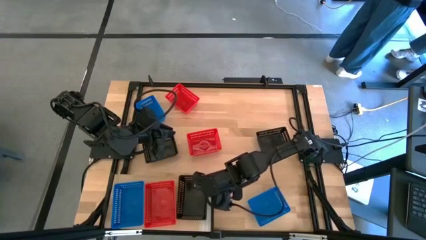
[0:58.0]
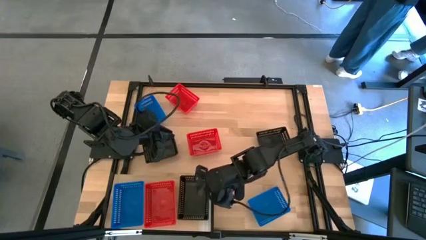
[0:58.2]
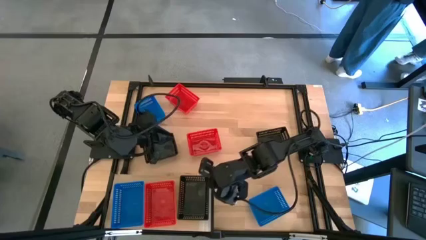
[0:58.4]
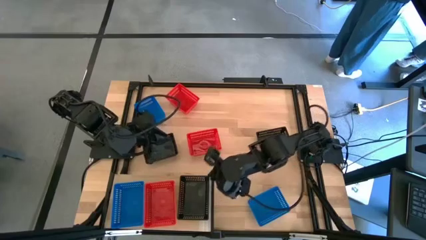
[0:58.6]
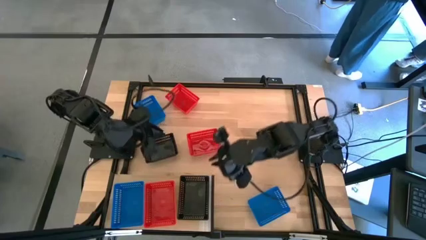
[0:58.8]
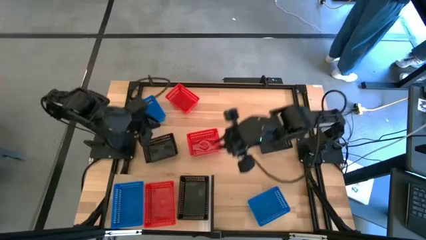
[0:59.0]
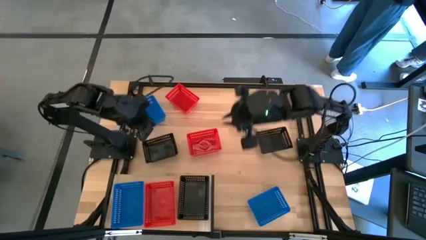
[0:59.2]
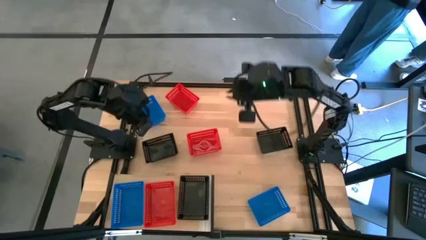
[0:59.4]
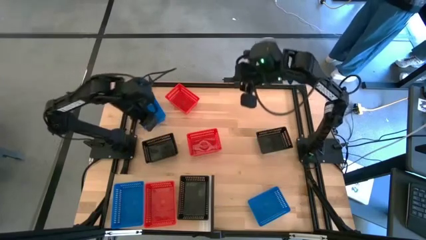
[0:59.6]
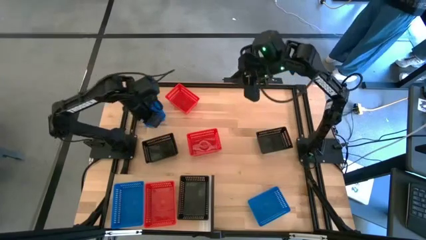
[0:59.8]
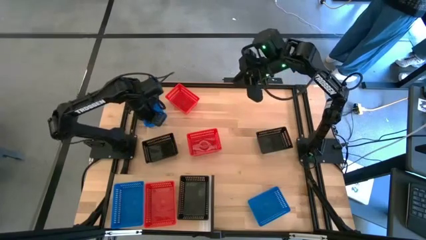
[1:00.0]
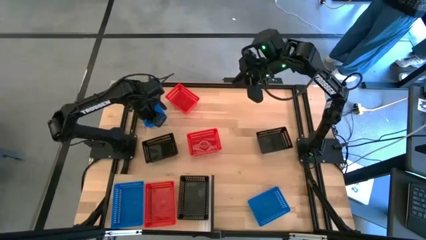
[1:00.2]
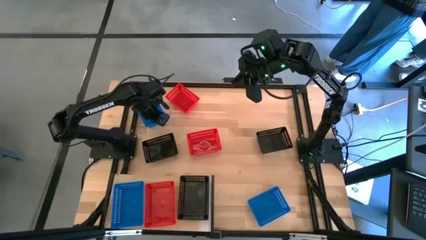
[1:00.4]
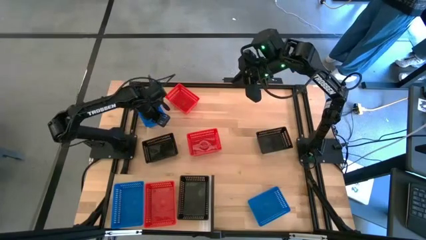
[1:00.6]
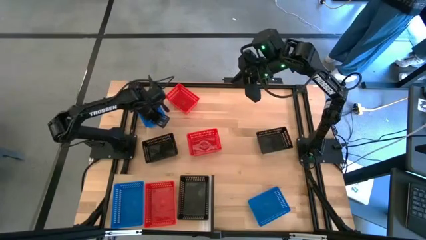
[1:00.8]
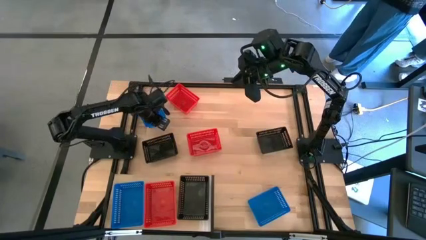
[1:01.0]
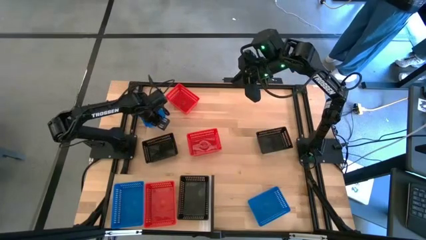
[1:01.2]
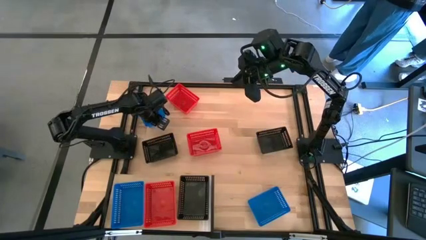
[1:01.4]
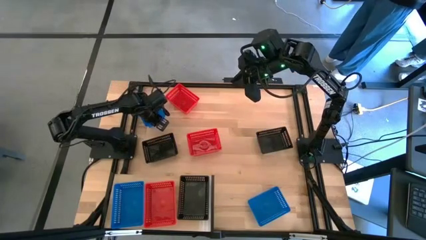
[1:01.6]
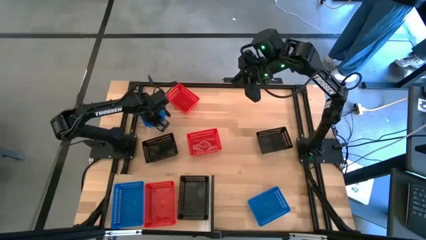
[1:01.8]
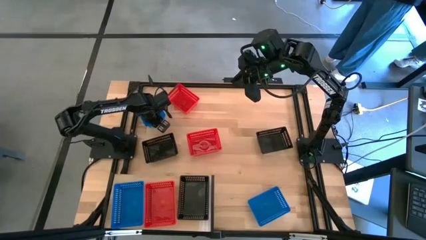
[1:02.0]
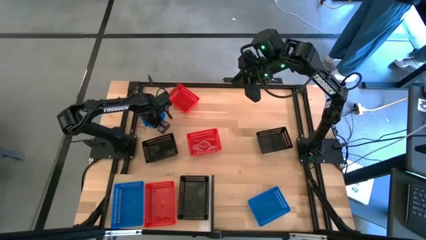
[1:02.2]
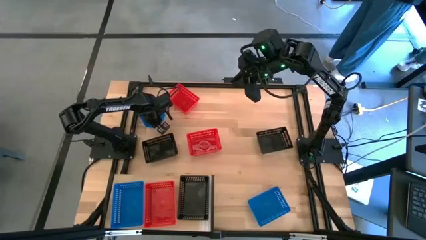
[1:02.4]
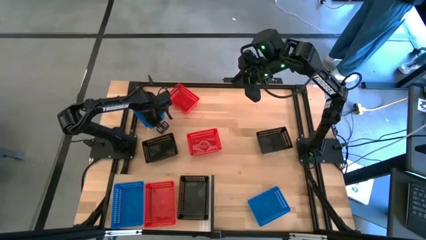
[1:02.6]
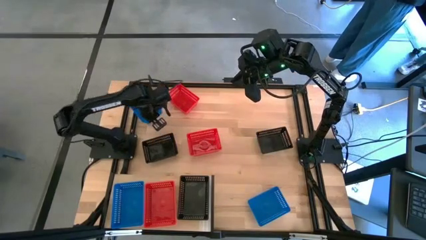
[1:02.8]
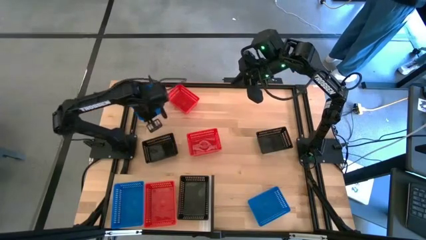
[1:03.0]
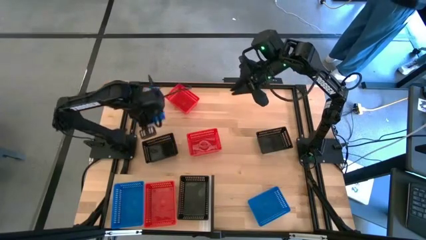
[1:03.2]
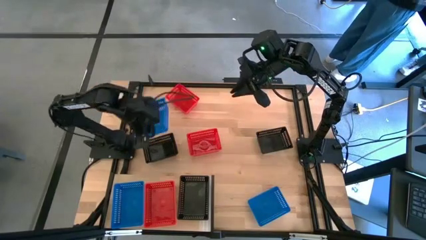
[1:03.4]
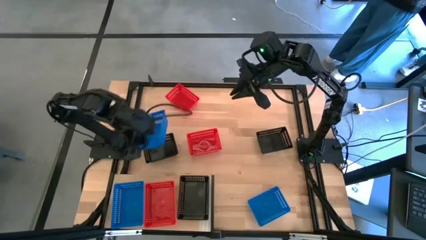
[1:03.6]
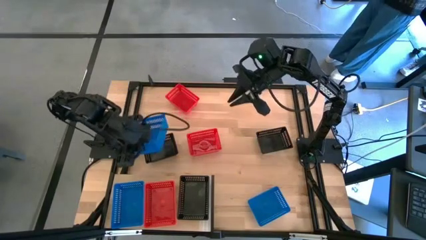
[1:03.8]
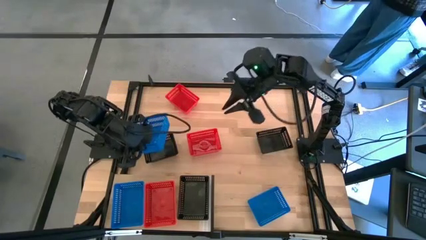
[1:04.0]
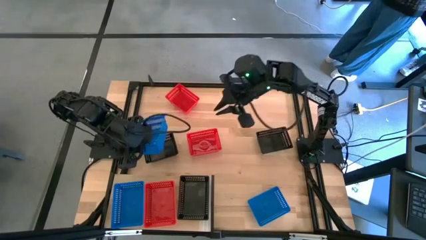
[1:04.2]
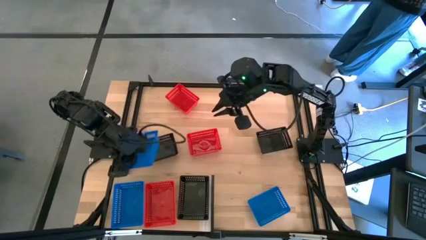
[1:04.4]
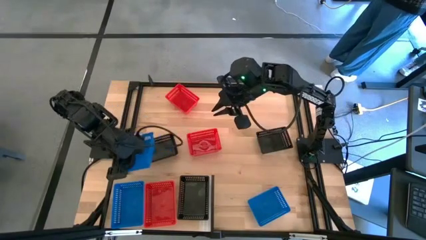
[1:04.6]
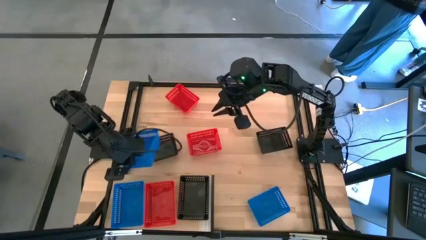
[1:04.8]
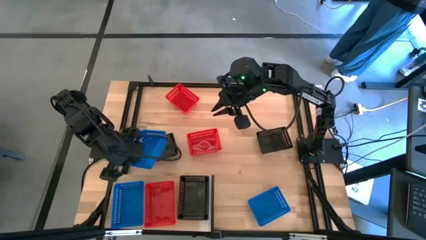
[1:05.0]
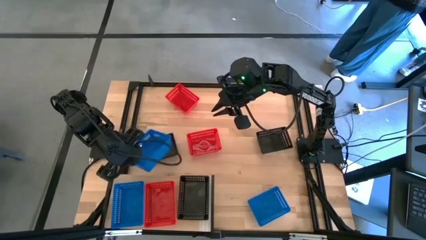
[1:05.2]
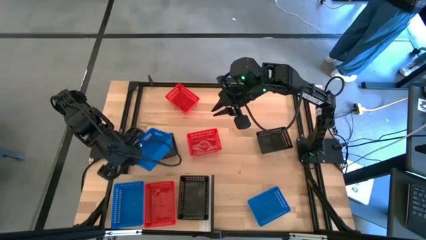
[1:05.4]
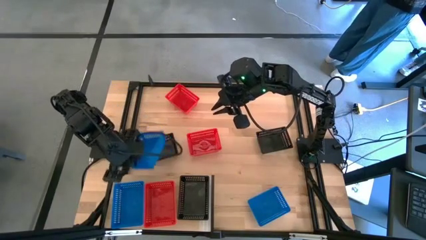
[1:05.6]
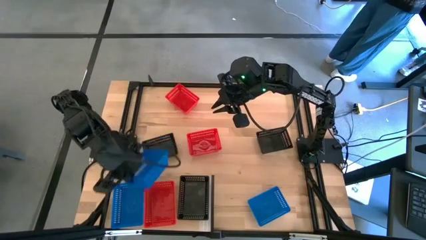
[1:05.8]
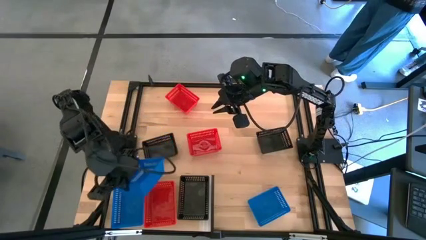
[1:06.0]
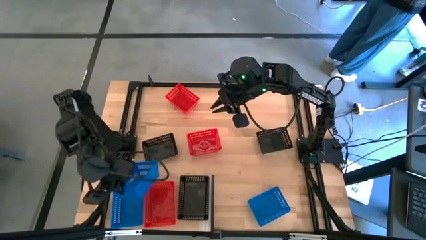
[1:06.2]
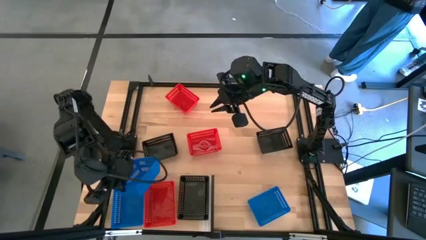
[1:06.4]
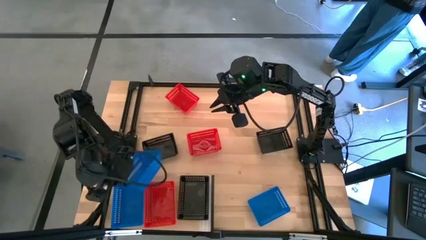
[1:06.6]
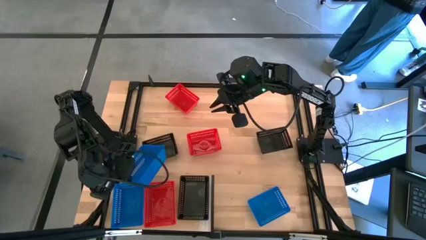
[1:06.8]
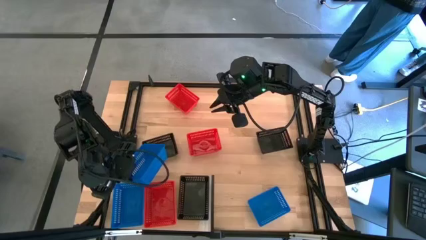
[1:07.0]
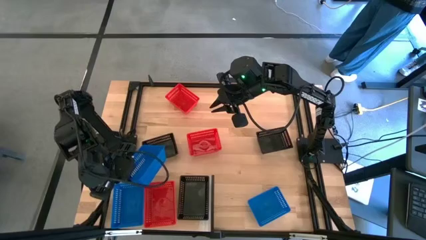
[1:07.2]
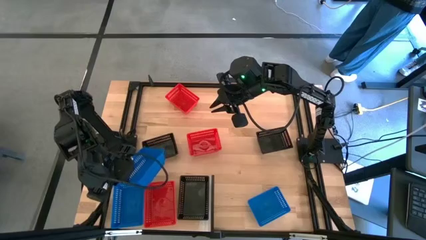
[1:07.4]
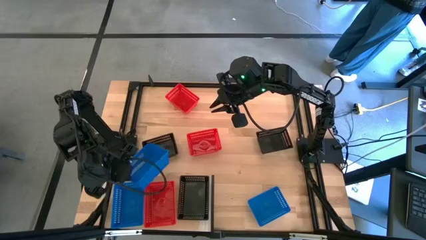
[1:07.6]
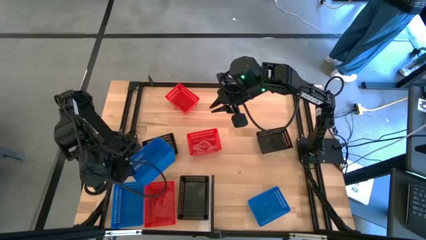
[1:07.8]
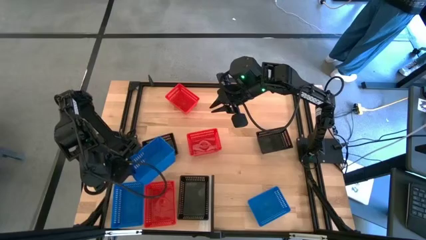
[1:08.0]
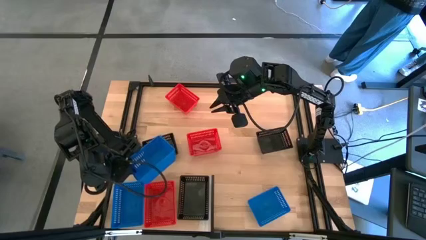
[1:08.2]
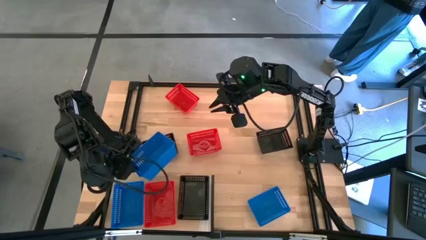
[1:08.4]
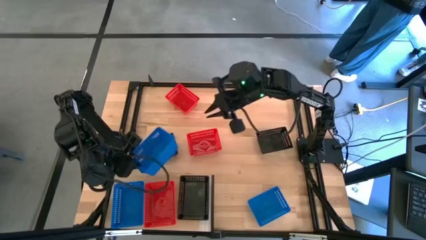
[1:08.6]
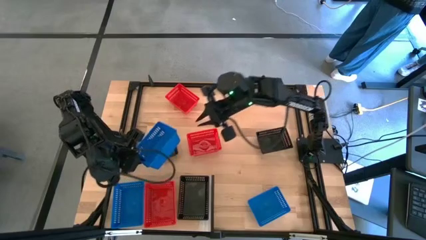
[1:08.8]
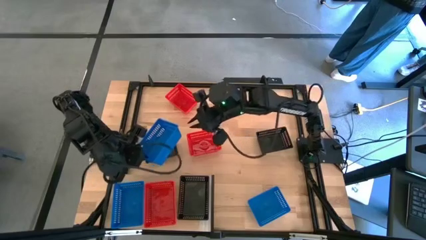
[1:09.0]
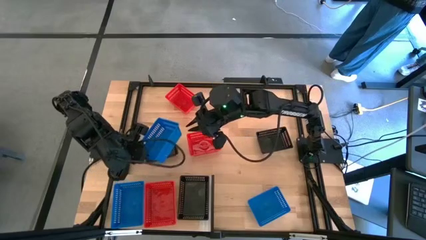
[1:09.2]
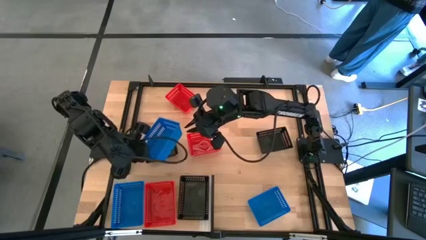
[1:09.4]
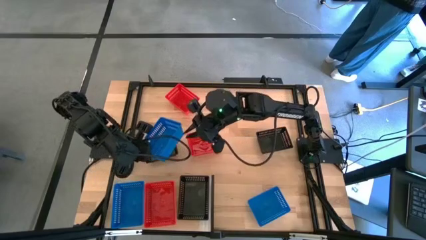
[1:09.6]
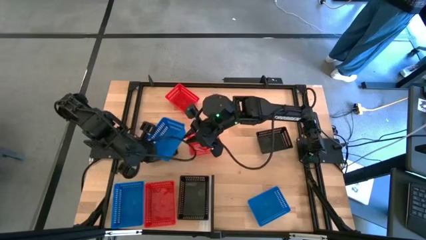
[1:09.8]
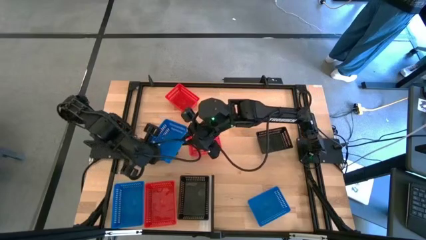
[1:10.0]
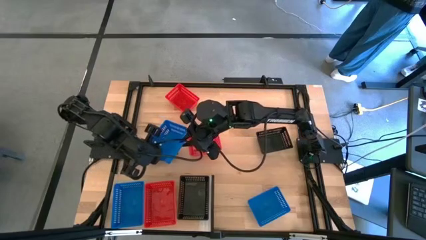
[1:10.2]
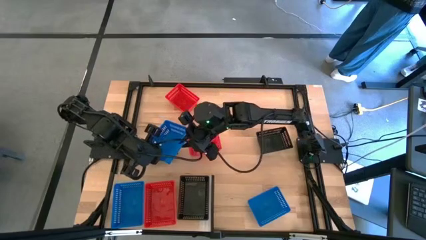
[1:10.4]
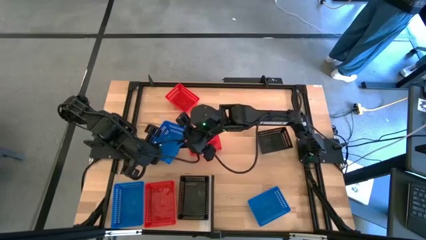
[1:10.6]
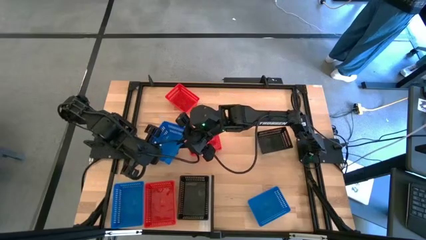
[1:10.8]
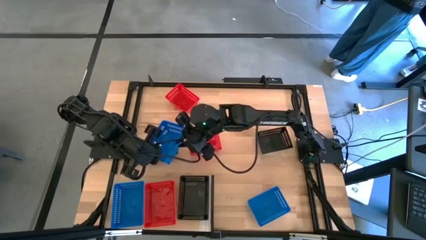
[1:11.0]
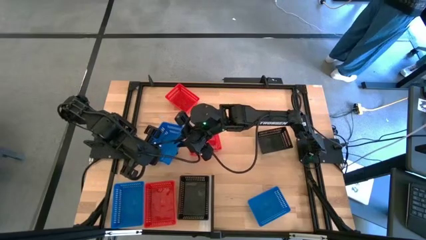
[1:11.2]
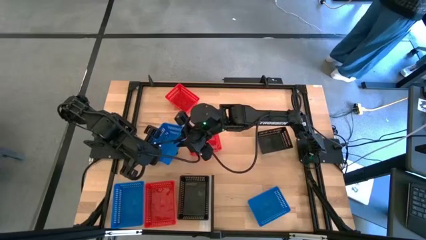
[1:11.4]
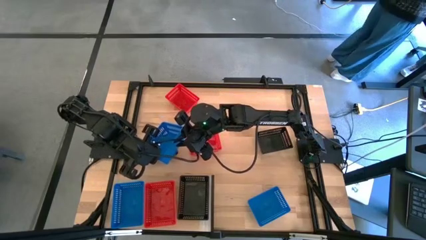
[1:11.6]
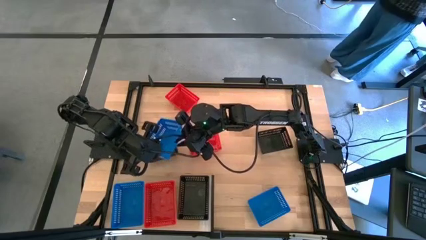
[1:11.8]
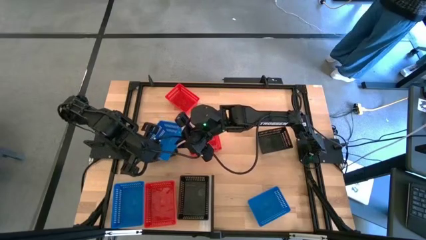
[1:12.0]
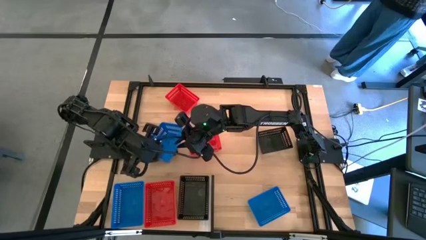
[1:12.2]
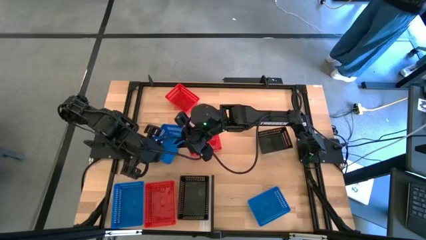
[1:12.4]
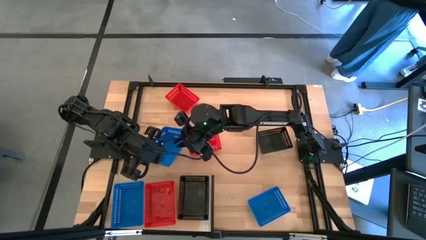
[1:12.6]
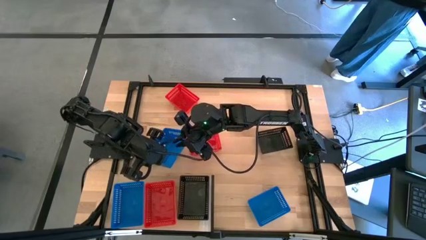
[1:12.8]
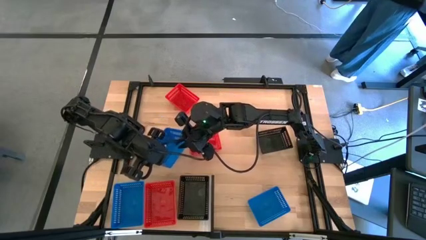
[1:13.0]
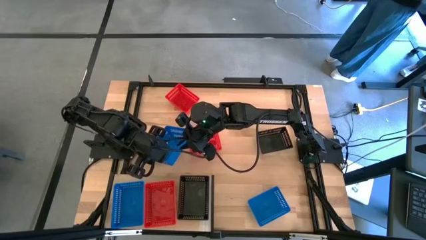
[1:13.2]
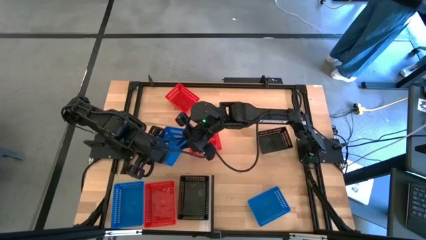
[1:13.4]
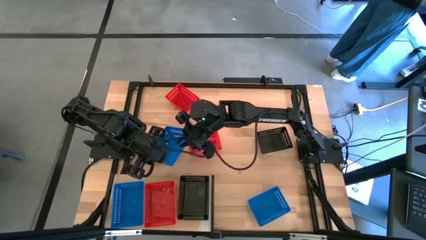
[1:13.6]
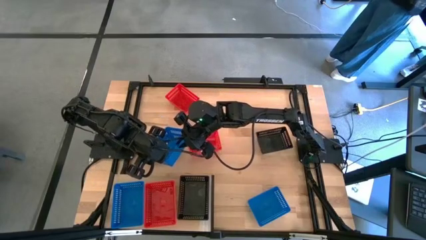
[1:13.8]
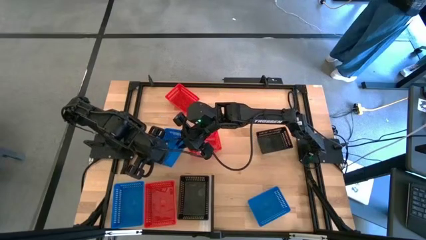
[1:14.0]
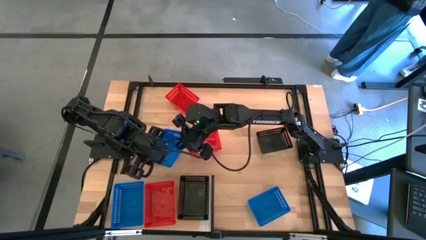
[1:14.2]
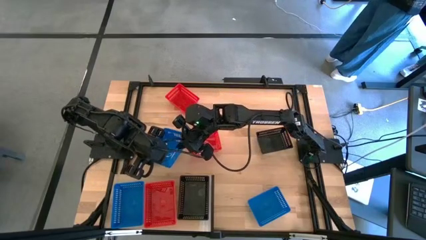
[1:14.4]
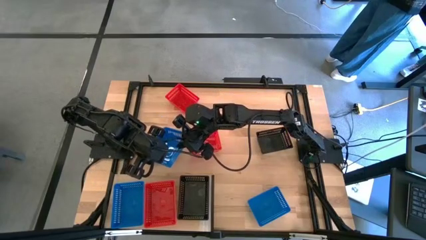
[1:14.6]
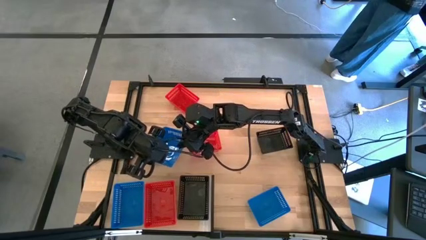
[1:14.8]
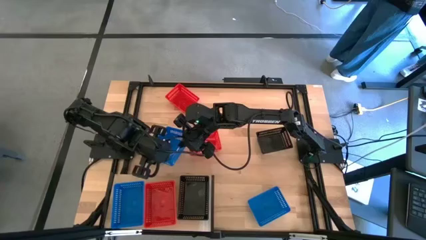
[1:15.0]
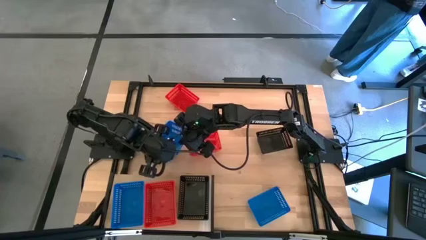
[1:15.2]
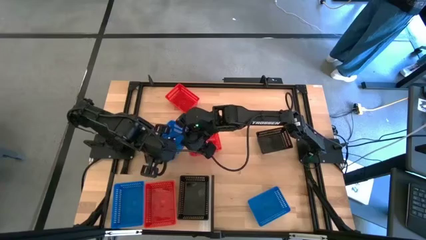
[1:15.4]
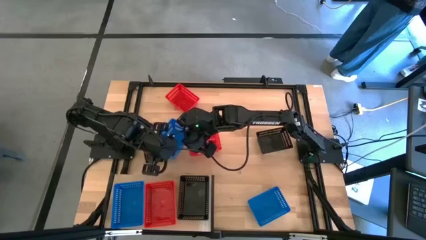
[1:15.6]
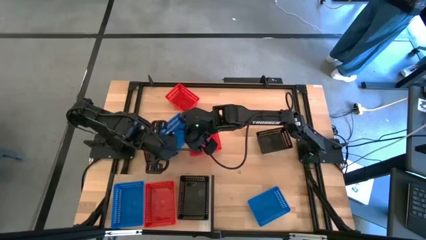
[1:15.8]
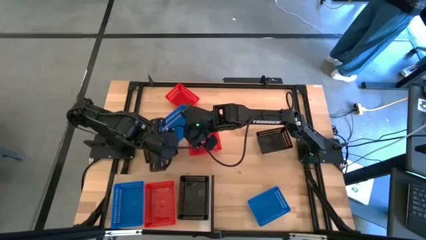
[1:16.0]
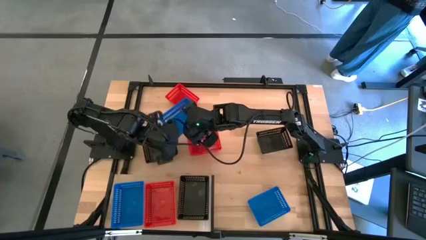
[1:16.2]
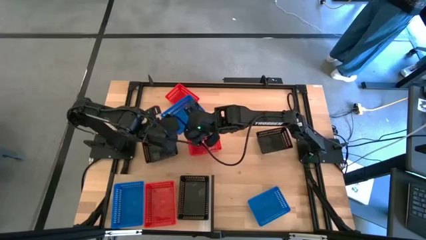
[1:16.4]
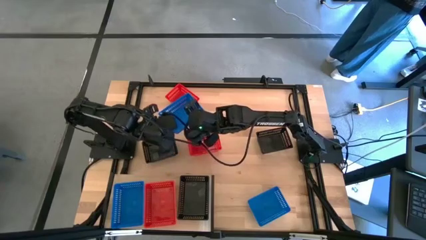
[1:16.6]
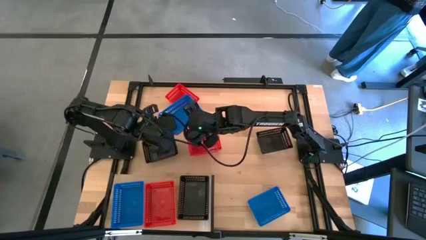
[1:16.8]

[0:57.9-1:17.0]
Task: Stack baskets on shelf by color
Stack the left blue bin on top of the other blue bin on the shelf
